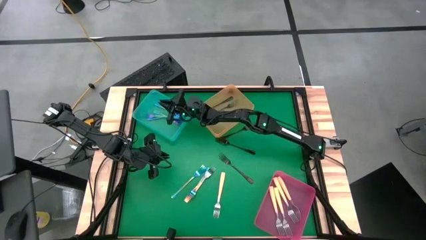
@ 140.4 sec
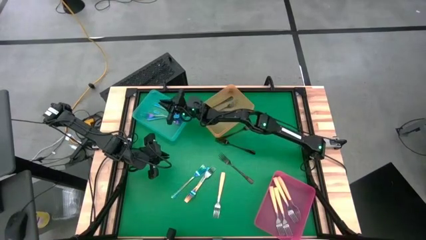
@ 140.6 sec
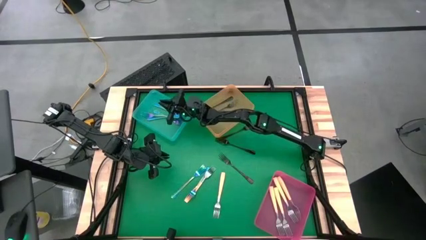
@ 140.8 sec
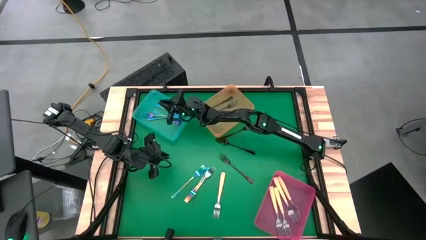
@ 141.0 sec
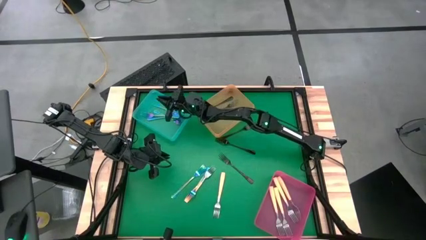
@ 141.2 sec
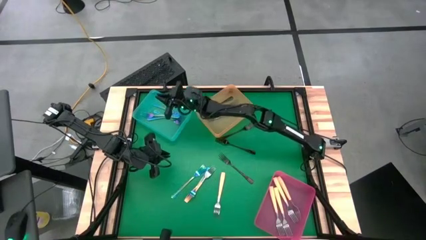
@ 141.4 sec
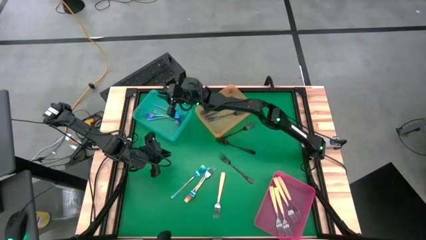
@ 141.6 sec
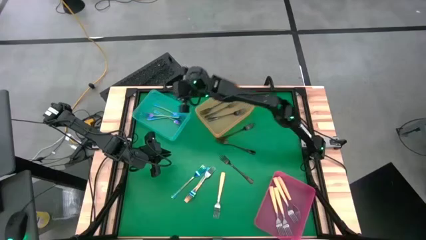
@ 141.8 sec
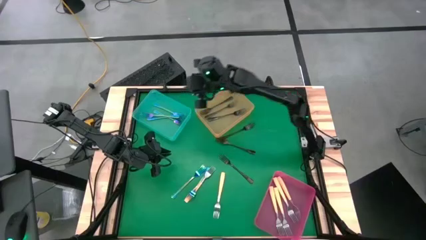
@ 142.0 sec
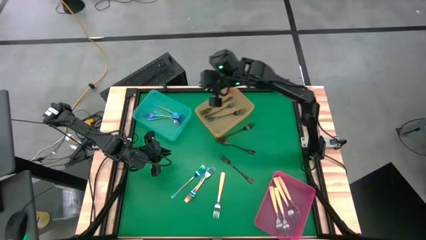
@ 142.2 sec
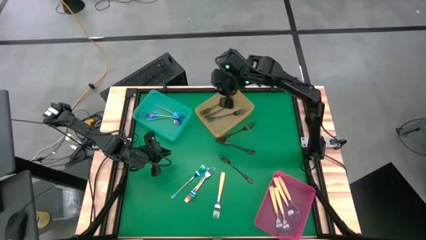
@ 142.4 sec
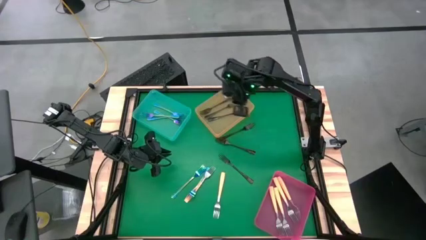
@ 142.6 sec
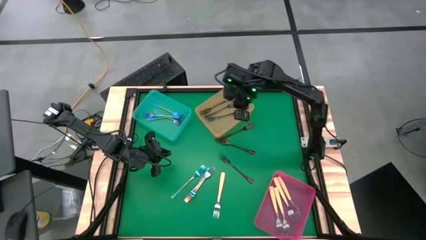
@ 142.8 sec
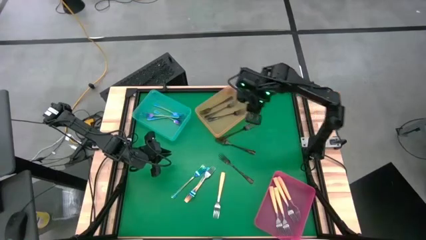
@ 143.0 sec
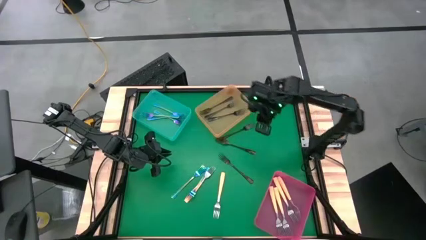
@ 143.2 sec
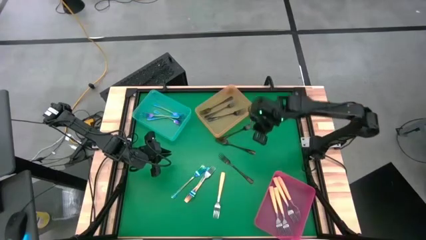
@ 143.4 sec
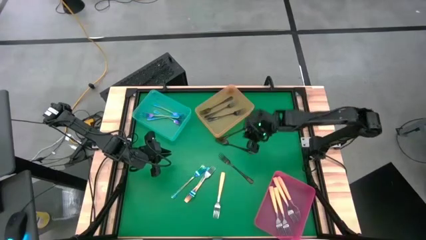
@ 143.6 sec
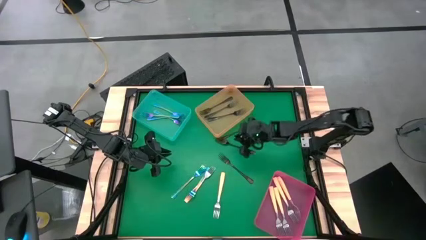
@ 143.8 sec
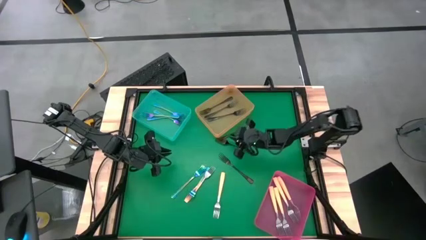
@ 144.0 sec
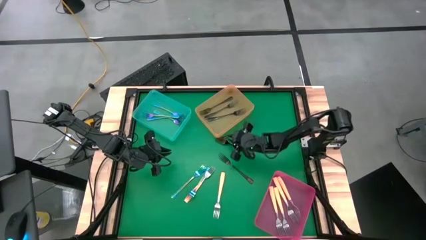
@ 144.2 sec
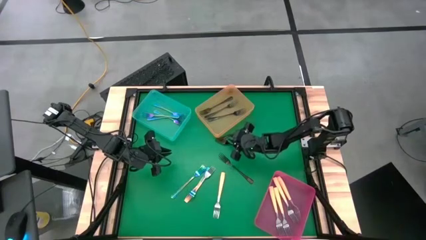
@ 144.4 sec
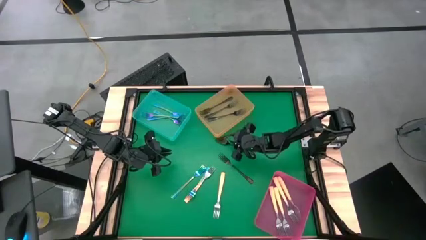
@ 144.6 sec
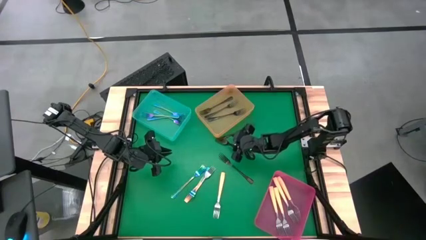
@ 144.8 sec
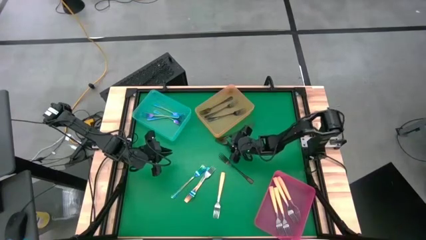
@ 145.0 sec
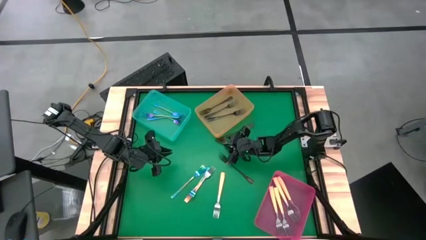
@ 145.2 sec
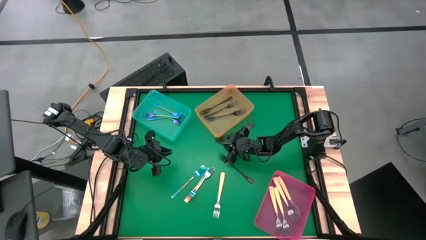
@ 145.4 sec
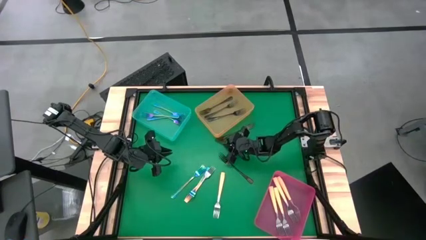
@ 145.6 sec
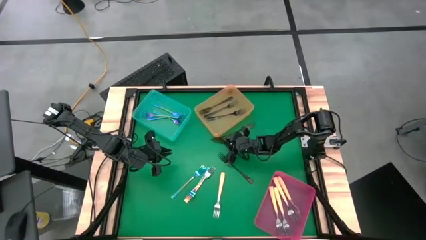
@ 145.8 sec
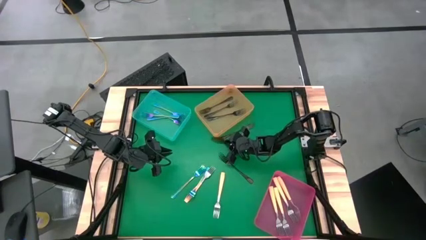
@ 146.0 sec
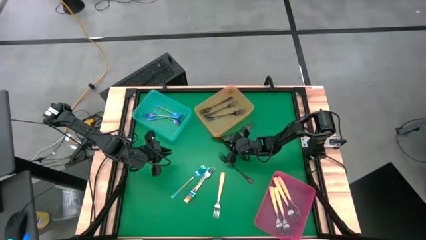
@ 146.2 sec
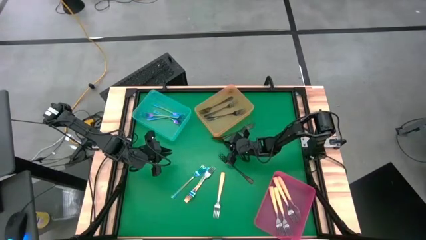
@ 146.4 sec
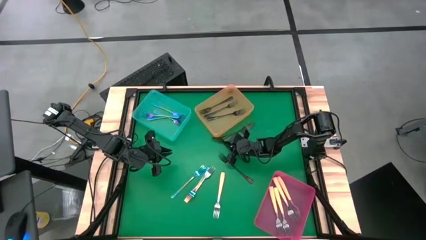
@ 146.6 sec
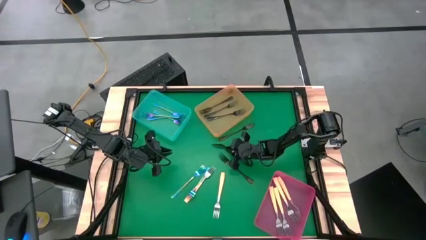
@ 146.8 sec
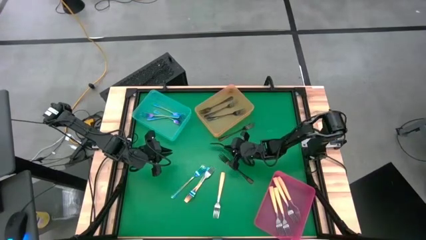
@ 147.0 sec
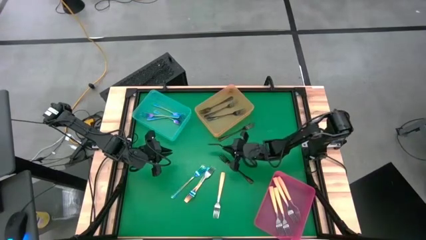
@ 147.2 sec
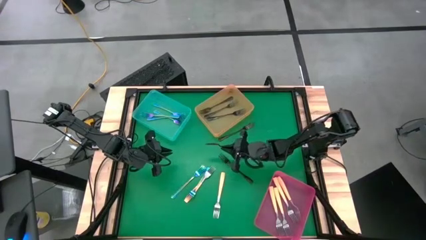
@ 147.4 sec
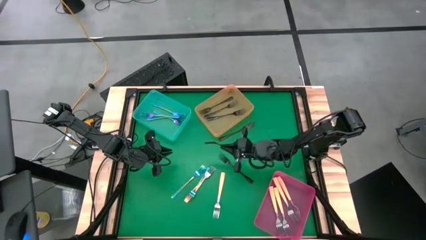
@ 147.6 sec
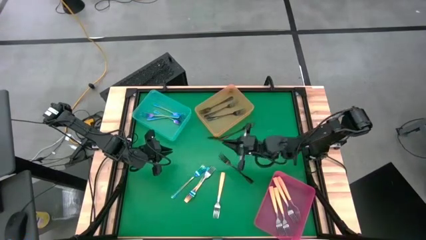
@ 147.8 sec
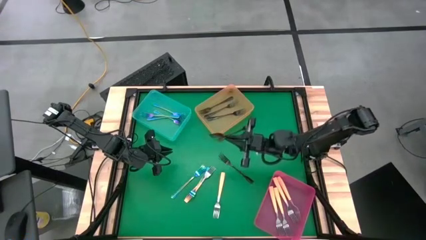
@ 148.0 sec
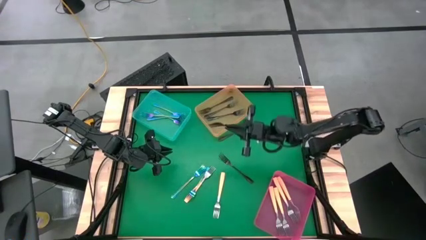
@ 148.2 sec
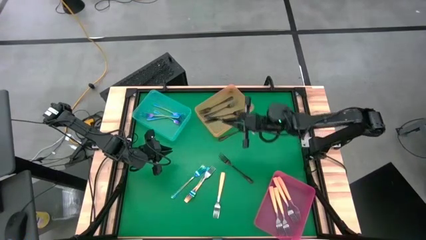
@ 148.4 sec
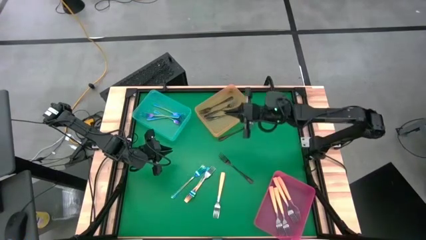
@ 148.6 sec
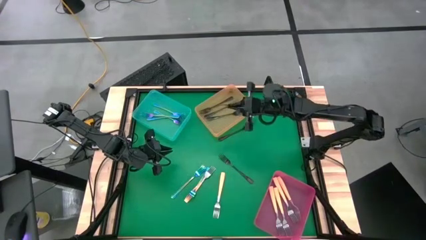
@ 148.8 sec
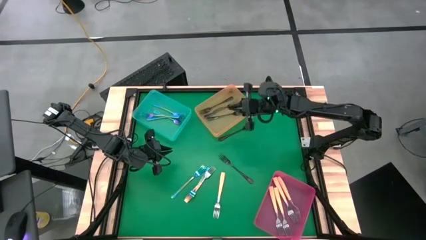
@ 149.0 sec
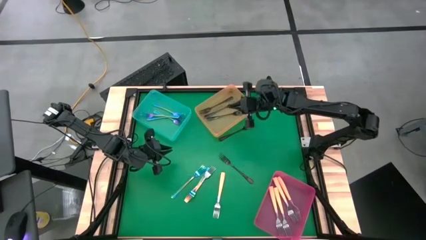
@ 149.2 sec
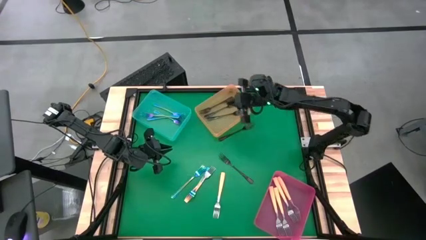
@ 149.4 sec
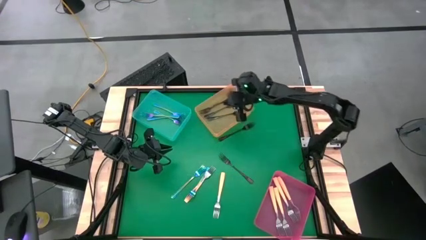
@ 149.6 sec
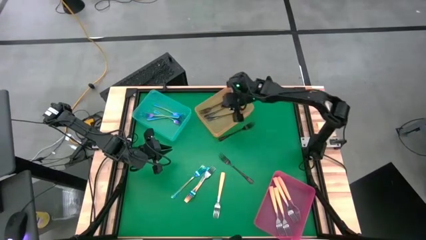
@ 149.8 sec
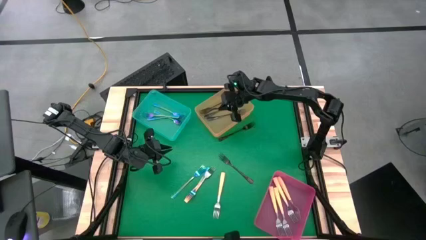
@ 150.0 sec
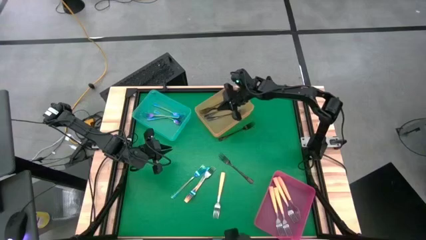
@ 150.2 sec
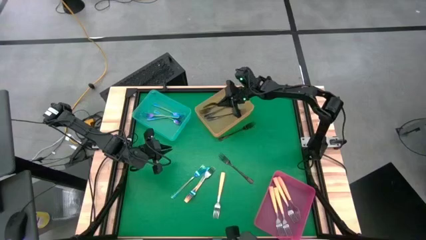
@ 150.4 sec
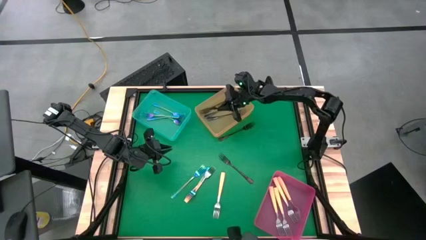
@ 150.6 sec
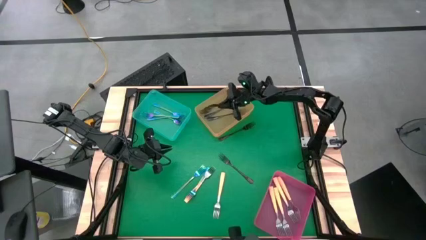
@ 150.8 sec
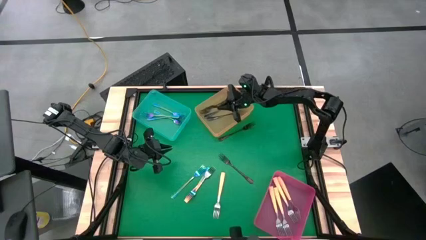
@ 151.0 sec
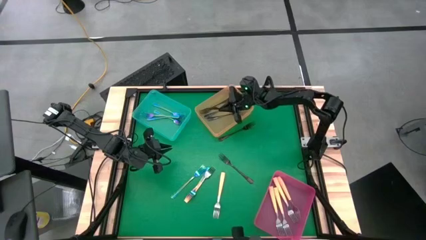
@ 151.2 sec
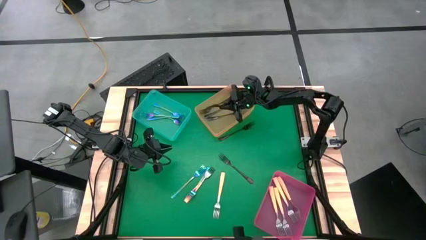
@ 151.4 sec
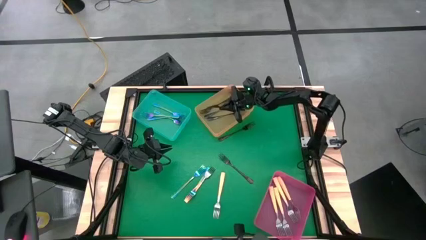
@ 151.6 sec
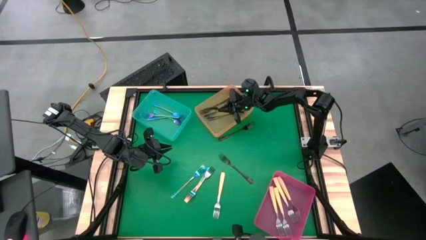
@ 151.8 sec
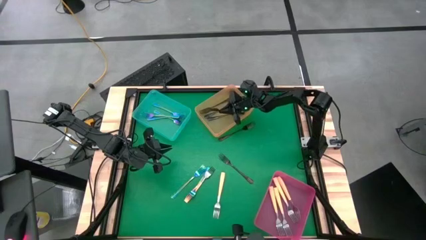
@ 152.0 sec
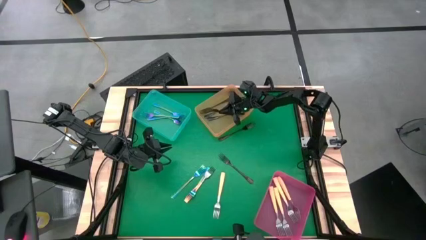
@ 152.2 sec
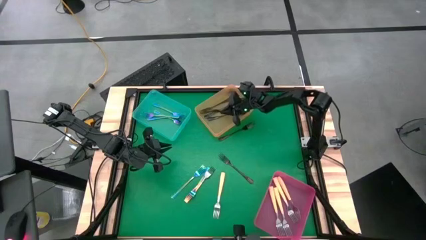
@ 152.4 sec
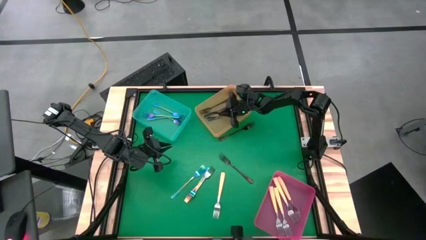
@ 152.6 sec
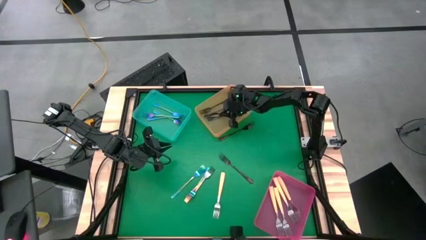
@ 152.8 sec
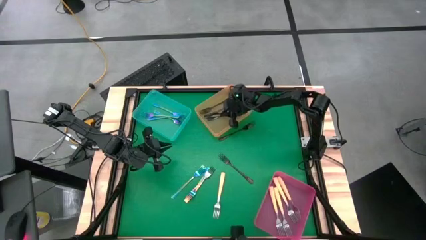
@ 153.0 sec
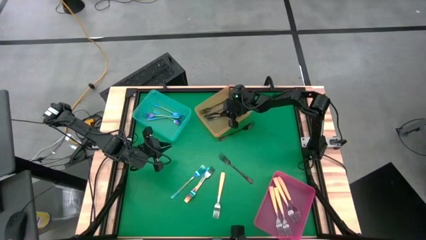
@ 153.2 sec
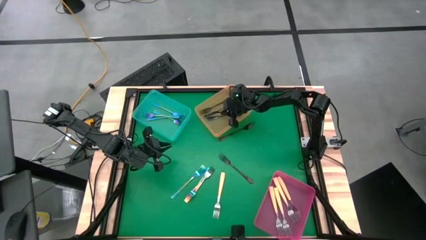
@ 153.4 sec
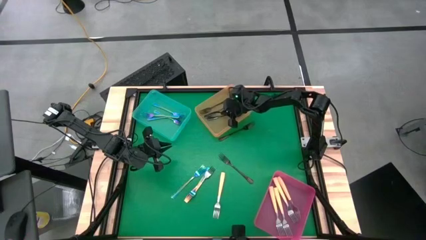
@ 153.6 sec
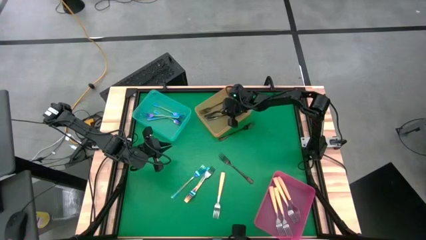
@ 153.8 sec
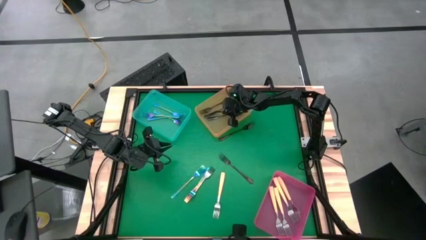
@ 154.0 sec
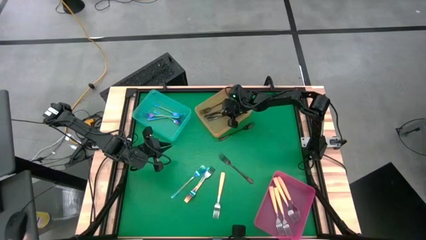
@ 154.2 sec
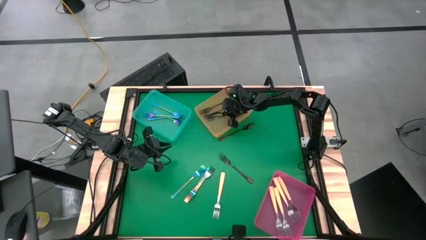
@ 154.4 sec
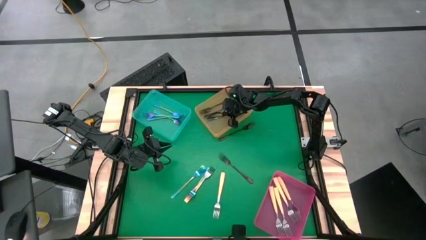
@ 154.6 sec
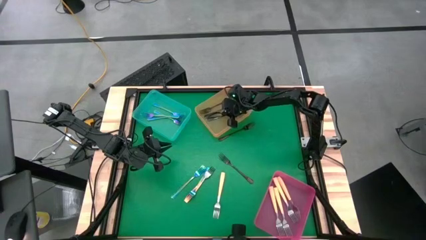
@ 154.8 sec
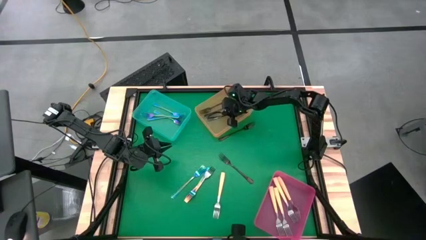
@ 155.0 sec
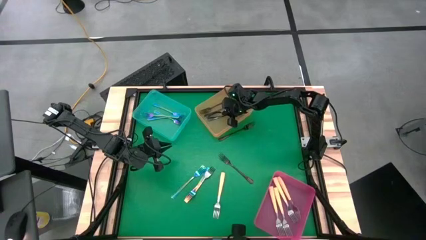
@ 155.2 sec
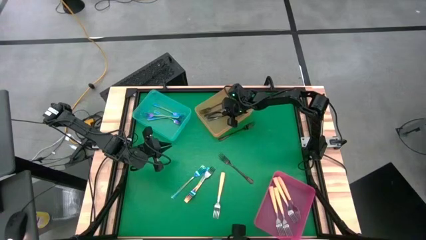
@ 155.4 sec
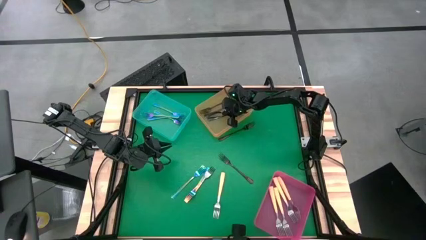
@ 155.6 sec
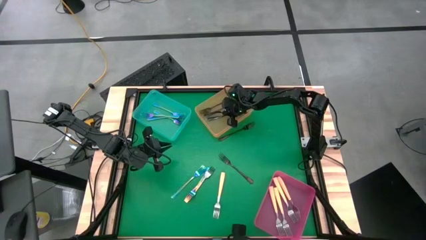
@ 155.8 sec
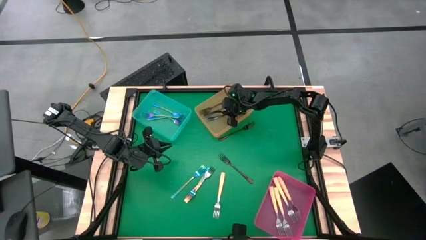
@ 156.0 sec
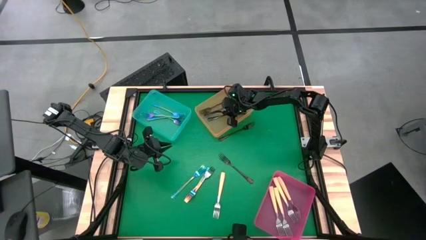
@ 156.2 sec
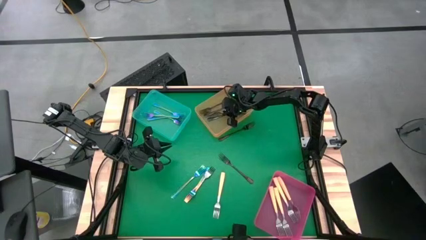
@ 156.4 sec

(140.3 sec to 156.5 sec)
Task: Sort silverware by color (type)
Put the black fork into the yellow bin
